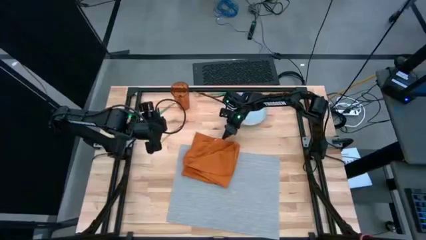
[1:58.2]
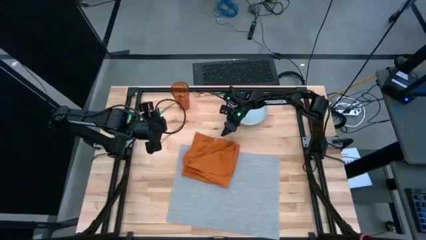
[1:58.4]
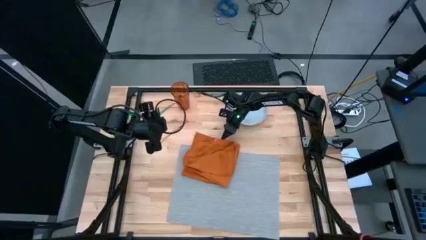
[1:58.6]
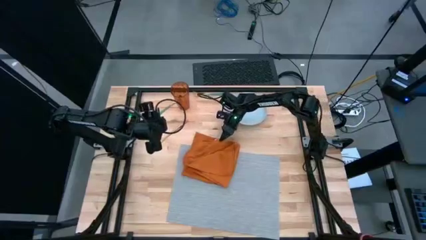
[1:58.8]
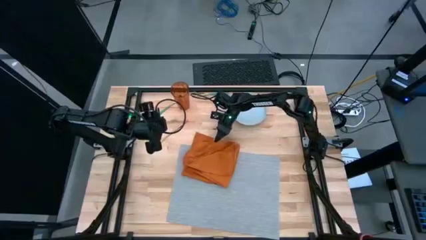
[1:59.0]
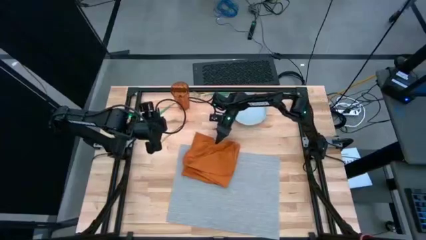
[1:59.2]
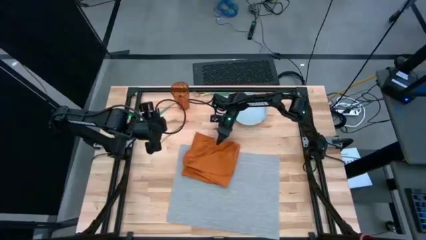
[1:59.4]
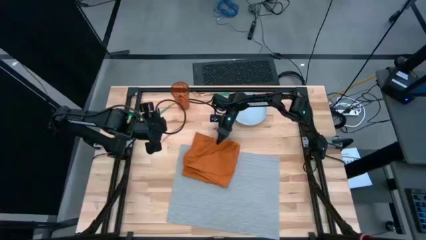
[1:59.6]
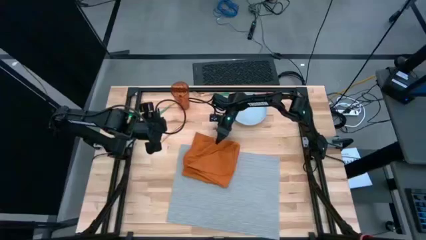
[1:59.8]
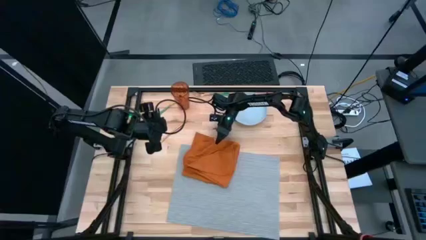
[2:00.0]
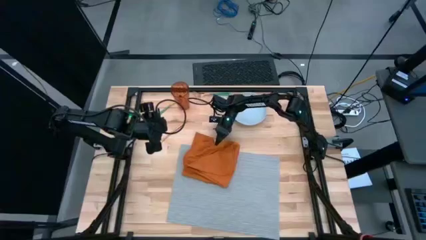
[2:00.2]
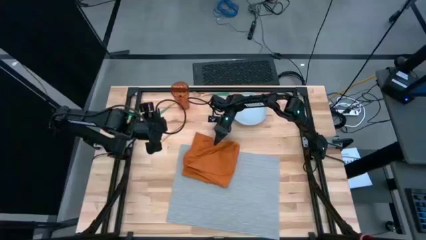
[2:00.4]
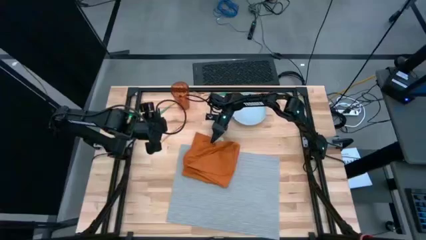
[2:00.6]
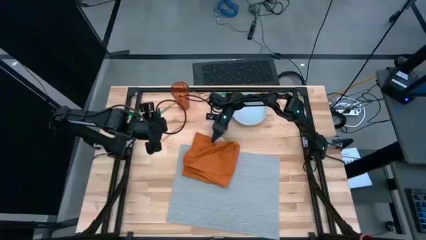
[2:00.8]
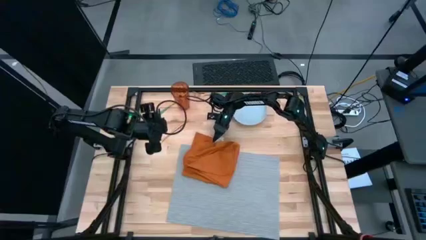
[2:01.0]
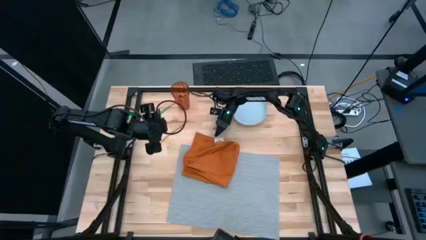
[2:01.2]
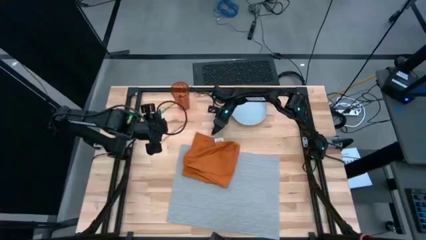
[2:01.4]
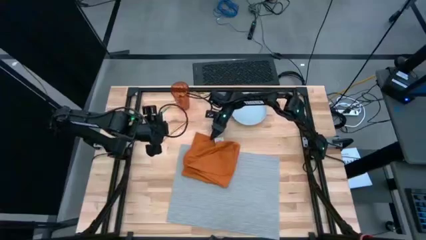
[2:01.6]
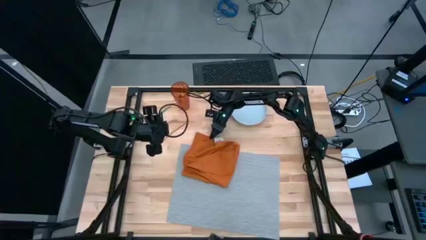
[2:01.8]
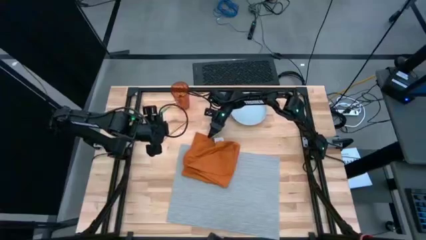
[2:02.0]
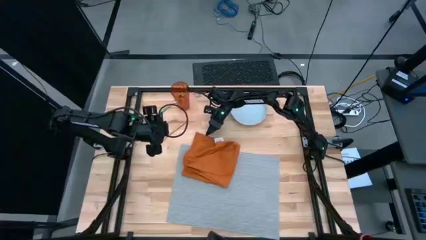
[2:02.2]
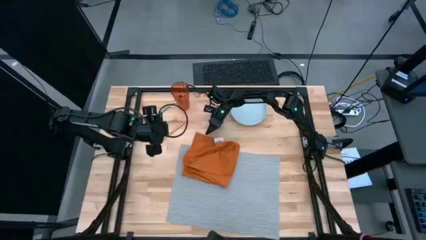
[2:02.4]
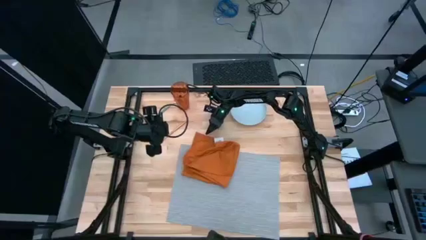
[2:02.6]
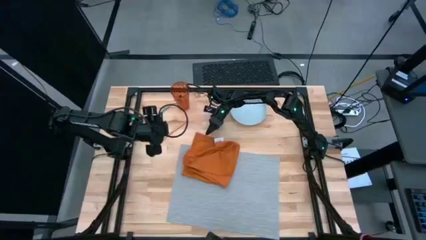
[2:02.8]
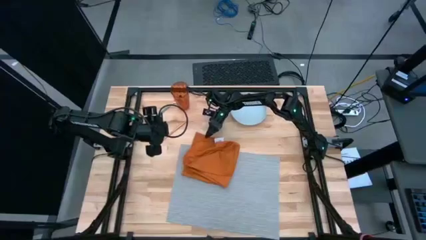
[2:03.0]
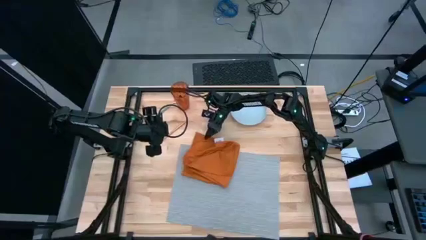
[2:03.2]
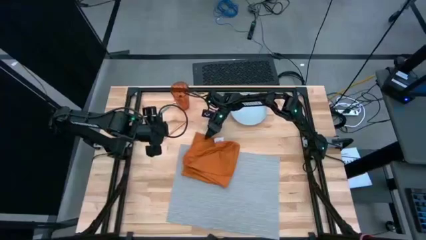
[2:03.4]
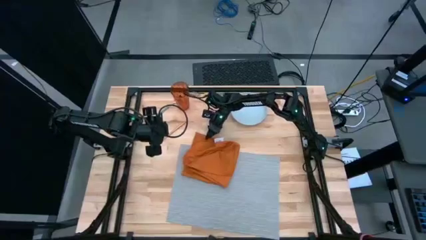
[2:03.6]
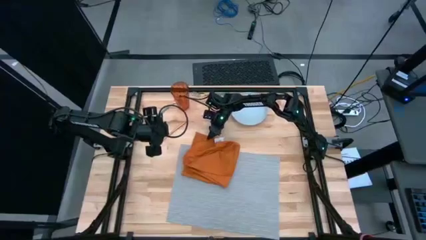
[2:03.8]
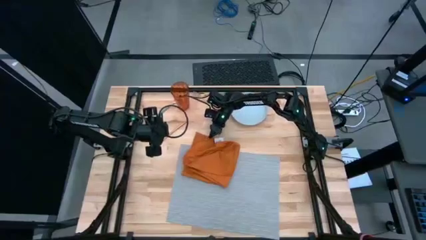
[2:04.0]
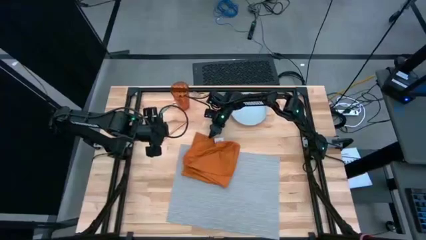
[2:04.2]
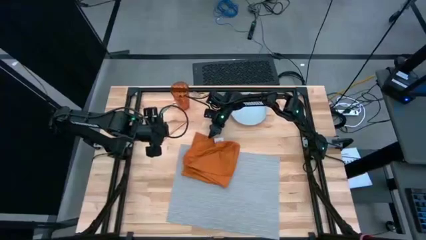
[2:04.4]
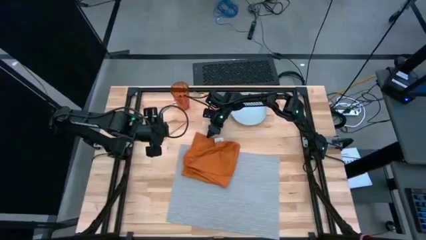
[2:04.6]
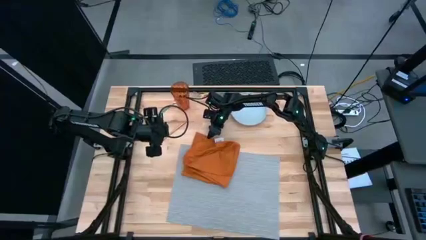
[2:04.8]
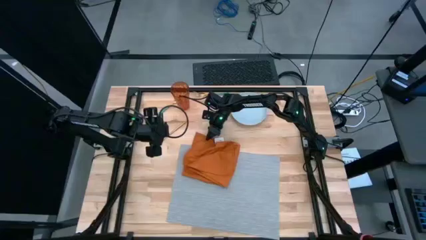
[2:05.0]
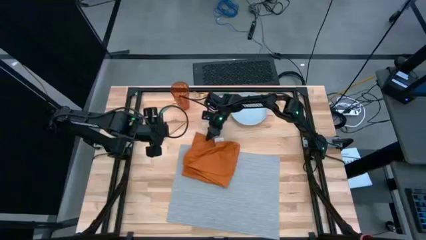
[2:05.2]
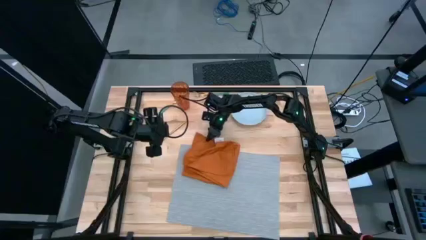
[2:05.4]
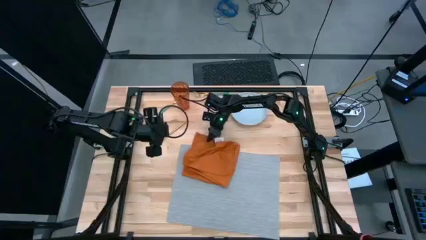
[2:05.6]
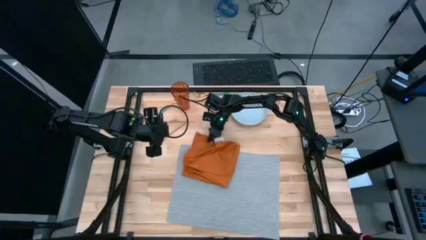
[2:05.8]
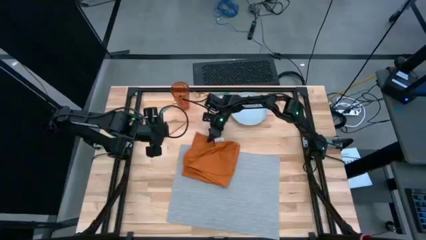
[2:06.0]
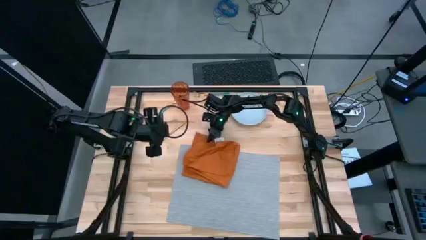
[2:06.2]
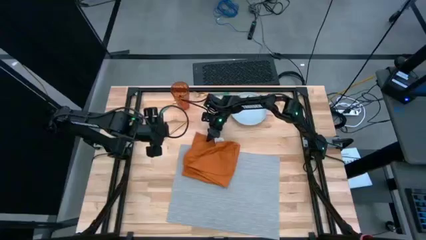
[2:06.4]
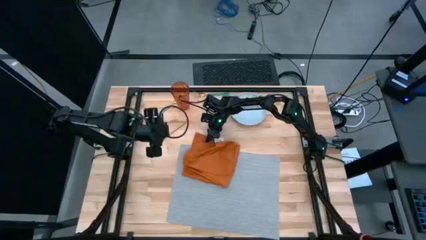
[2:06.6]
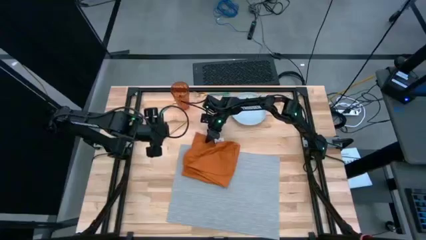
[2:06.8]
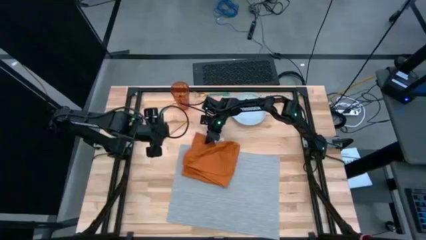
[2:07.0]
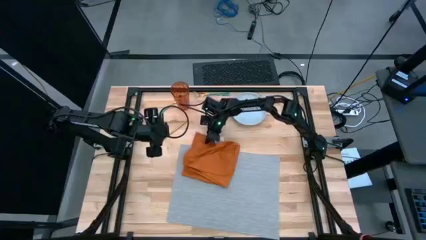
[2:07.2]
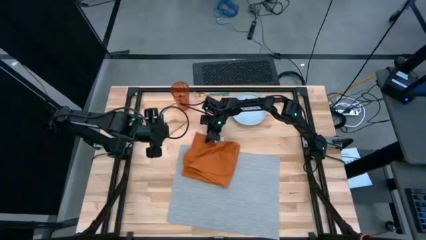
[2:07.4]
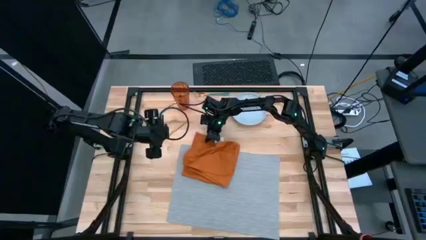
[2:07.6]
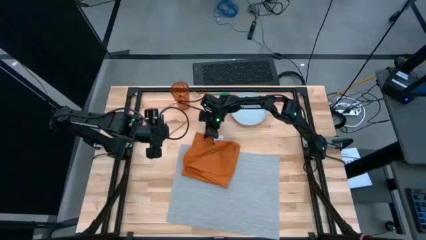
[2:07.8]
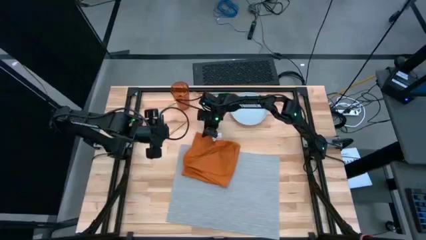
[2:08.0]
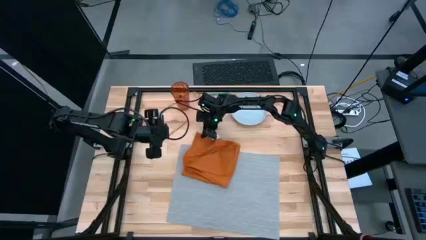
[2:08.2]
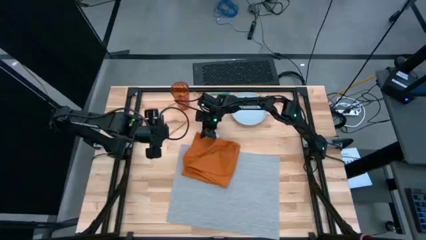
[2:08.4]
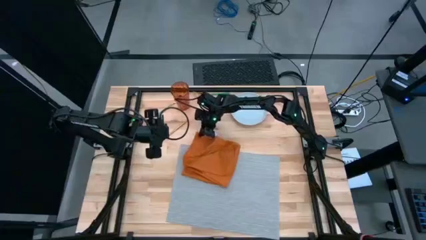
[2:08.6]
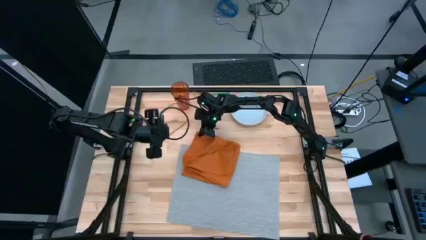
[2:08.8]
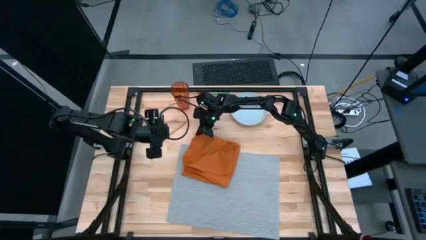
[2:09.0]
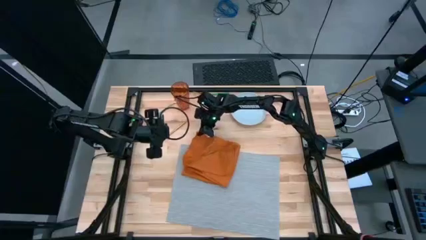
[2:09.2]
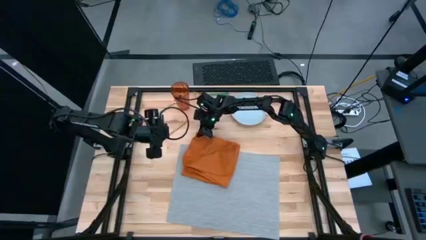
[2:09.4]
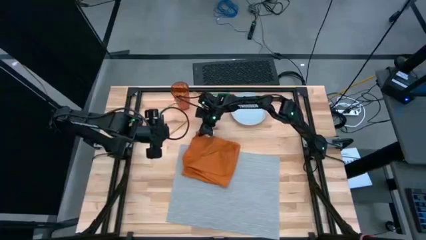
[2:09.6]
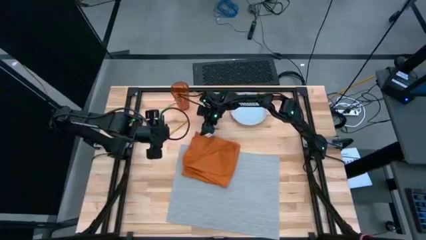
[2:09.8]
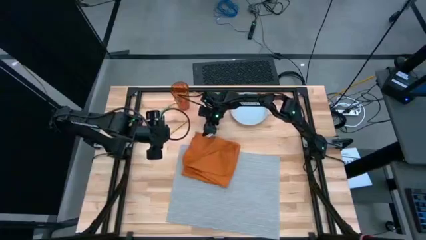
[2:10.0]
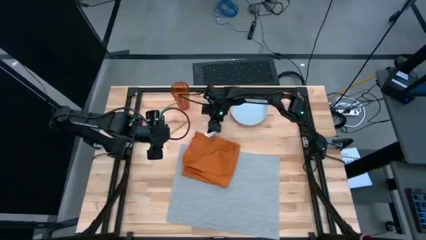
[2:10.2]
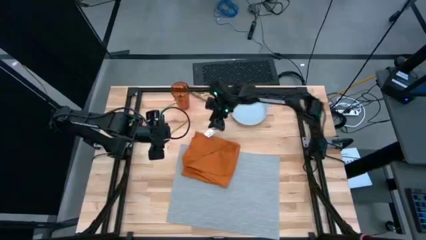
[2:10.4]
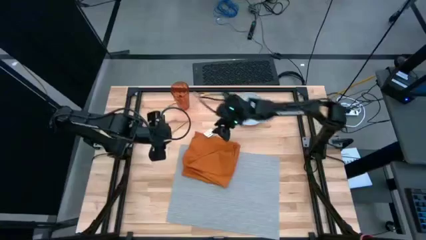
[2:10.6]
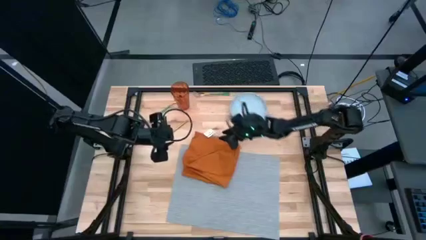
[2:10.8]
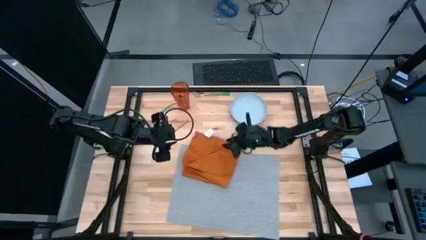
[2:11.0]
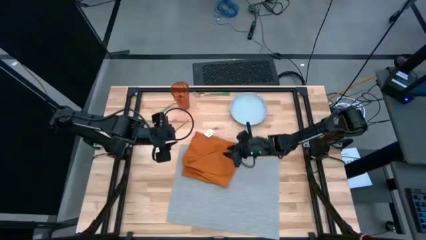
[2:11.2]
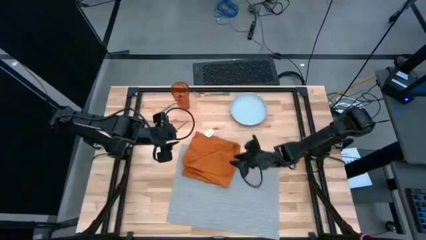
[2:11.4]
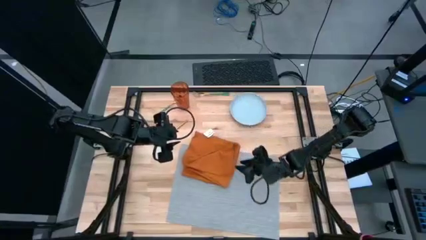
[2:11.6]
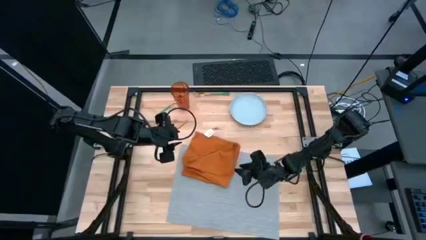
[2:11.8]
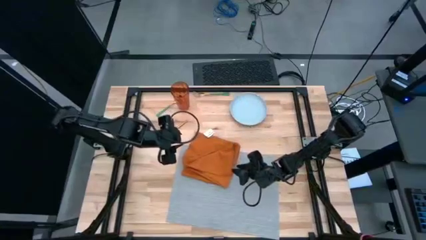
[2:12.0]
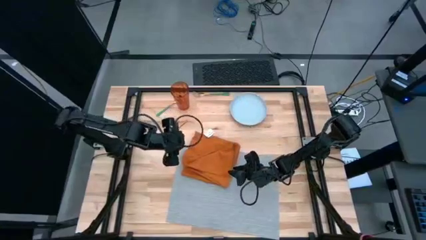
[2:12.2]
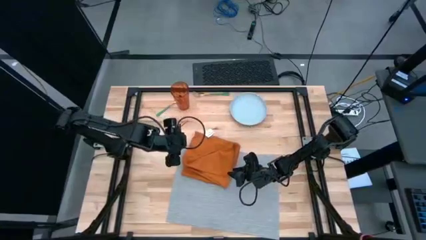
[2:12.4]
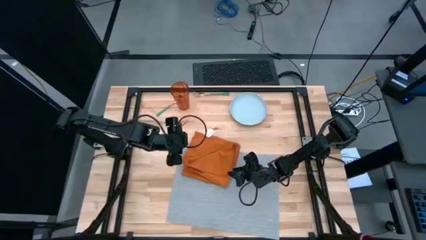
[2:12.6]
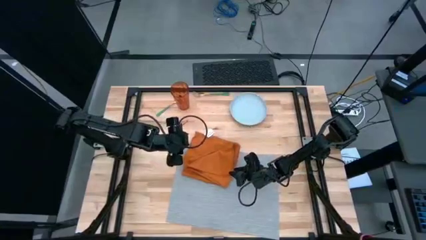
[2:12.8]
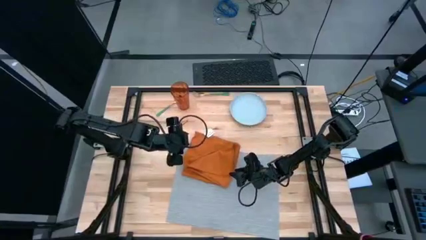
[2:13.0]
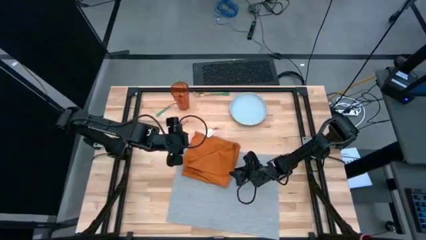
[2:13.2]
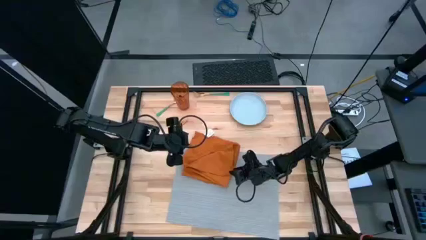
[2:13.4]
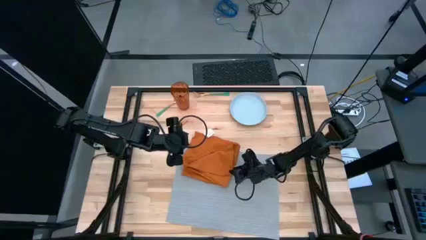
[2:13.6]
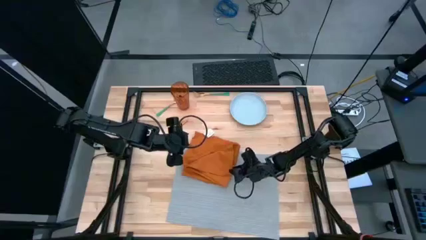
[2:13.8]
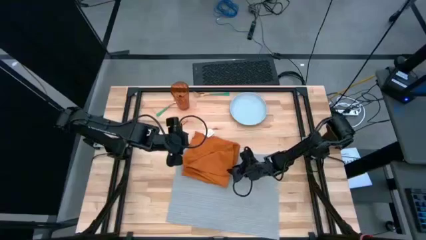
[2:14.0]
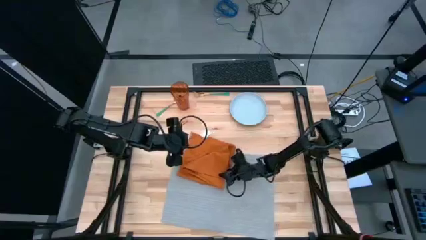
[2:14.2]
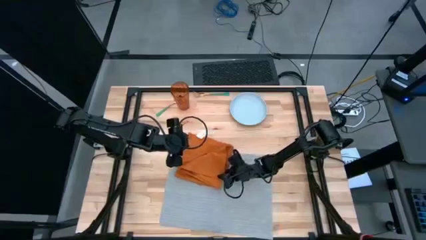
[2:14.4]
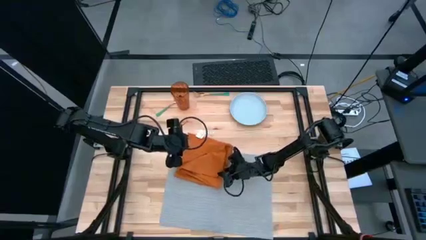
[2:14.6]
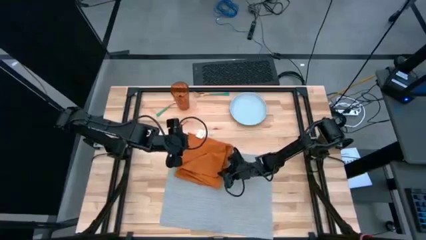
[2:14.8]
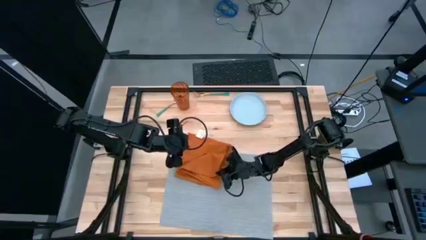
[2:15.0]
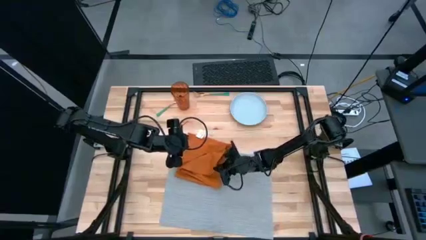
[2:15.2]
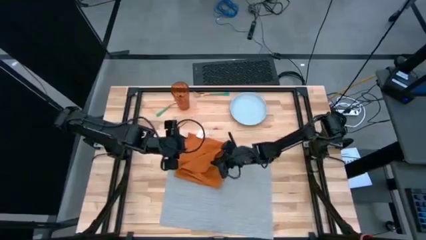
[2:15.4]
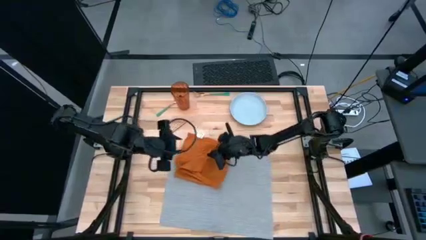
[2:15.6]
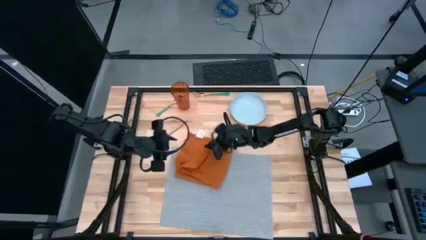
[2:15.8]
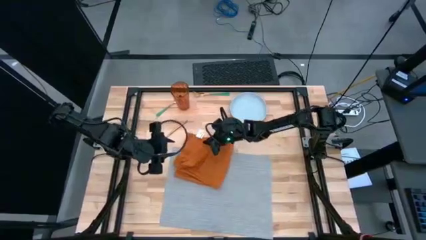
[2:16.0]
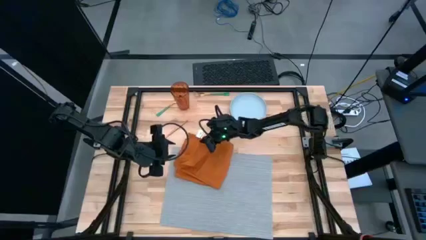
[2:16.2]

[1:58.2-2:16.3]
Task: Set table place
Fold the orange table napkin
